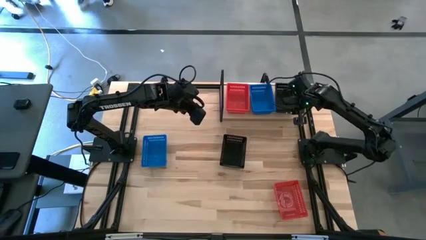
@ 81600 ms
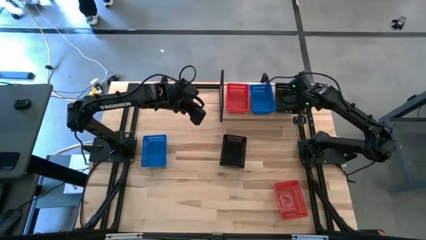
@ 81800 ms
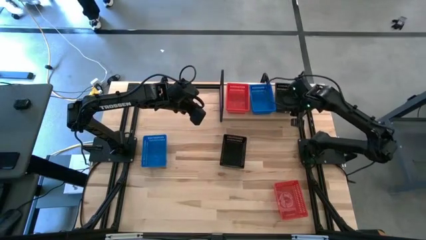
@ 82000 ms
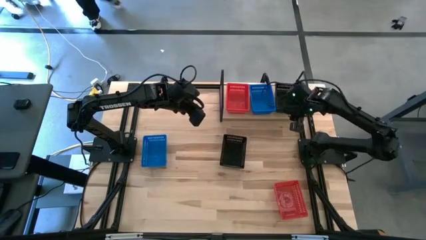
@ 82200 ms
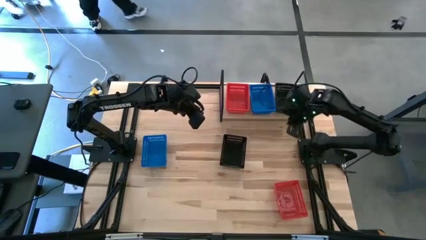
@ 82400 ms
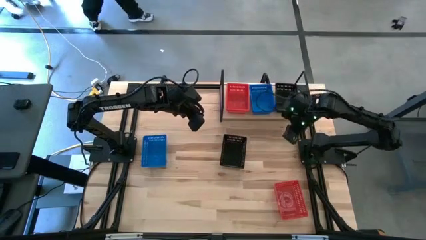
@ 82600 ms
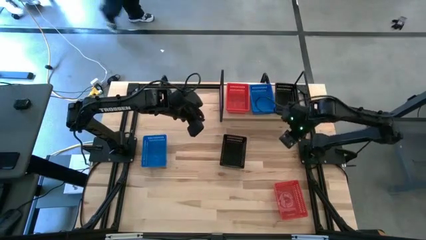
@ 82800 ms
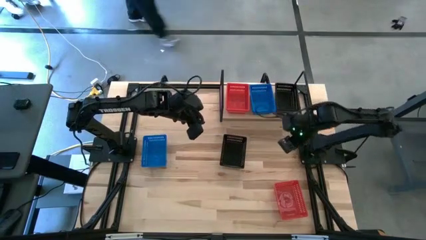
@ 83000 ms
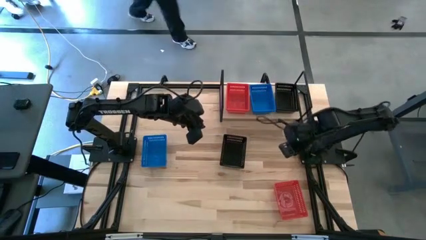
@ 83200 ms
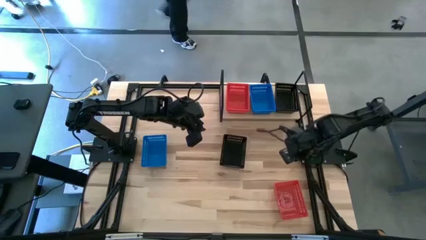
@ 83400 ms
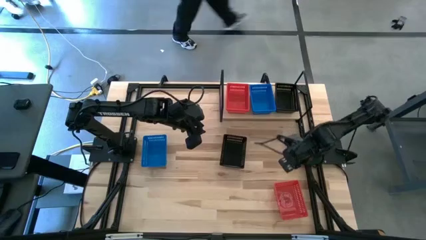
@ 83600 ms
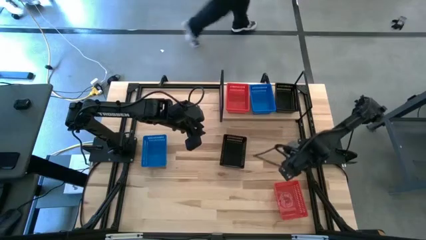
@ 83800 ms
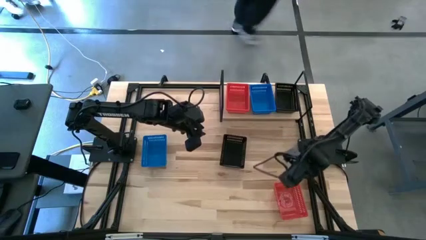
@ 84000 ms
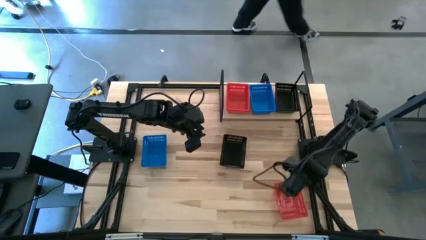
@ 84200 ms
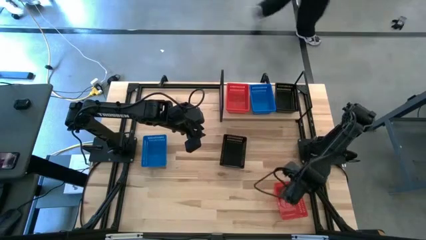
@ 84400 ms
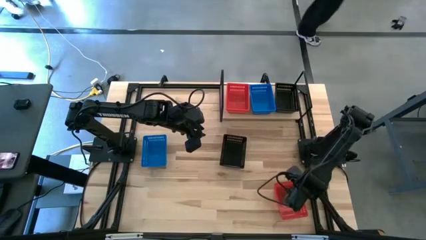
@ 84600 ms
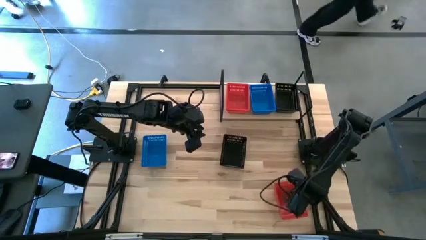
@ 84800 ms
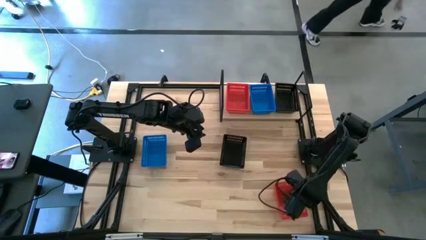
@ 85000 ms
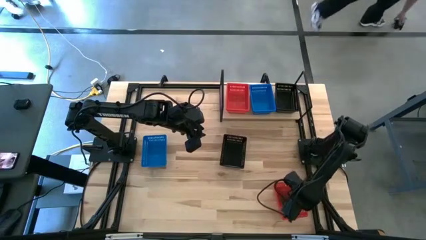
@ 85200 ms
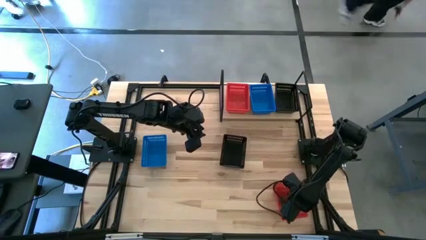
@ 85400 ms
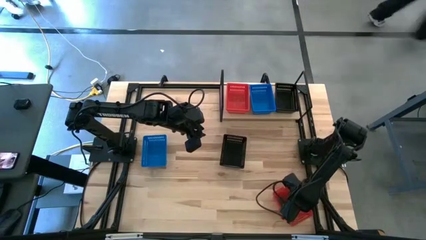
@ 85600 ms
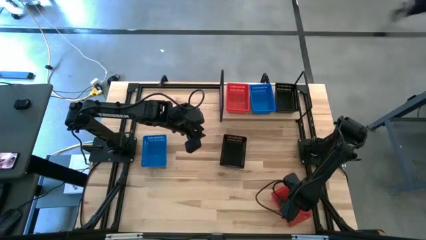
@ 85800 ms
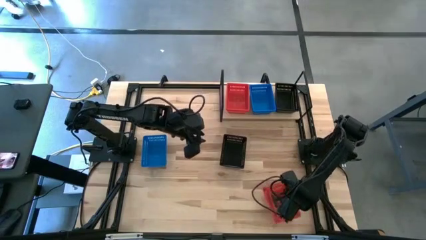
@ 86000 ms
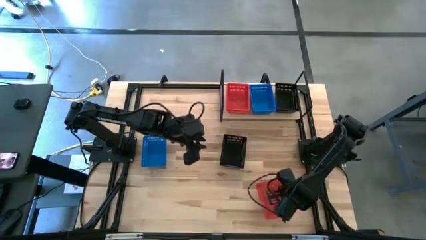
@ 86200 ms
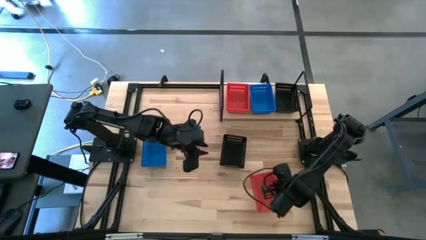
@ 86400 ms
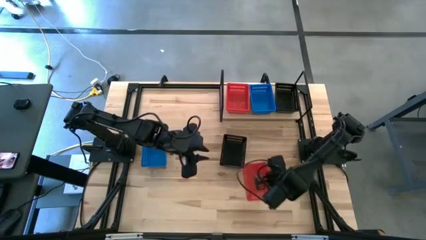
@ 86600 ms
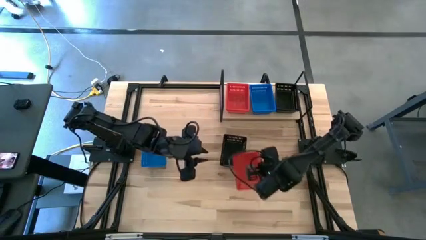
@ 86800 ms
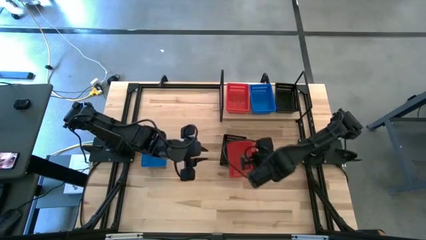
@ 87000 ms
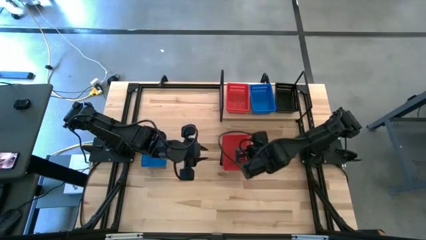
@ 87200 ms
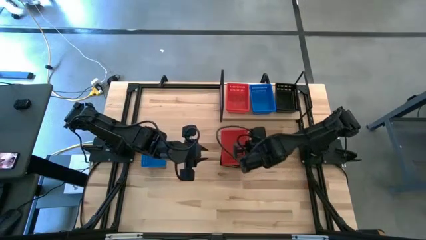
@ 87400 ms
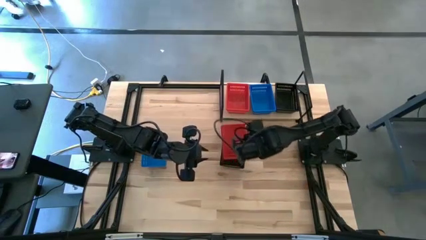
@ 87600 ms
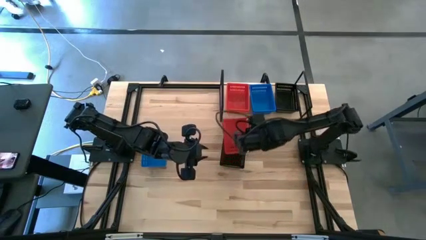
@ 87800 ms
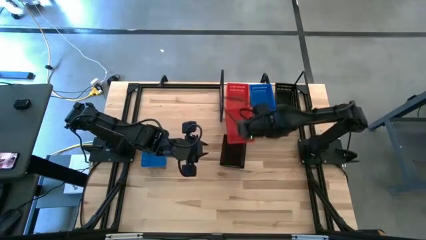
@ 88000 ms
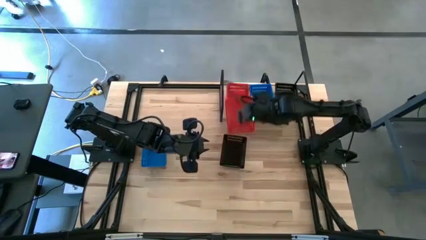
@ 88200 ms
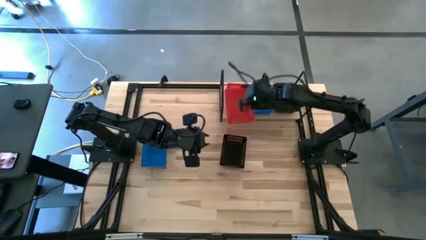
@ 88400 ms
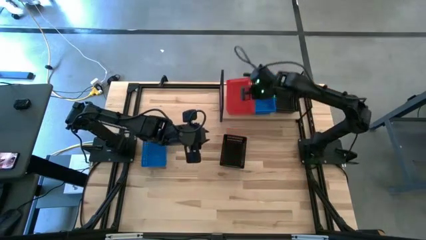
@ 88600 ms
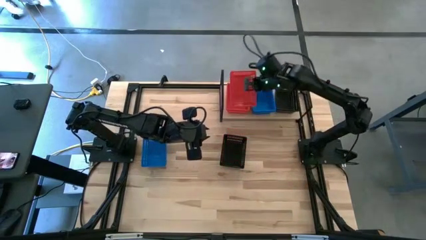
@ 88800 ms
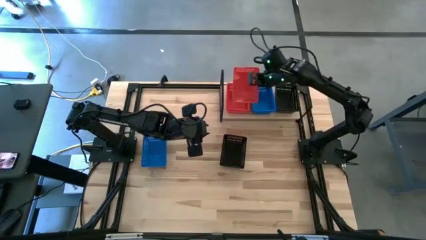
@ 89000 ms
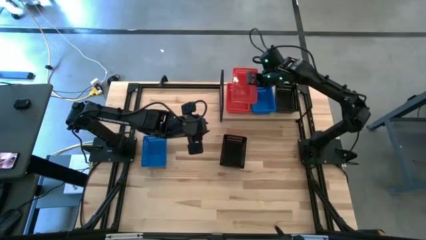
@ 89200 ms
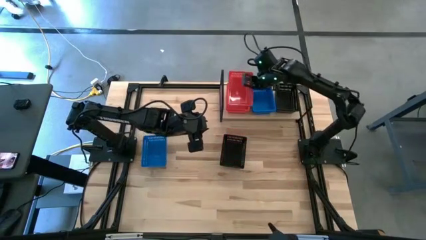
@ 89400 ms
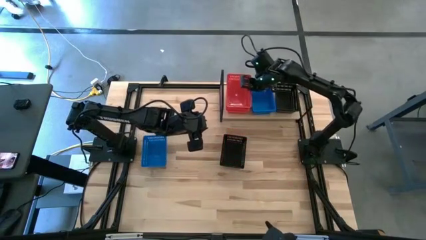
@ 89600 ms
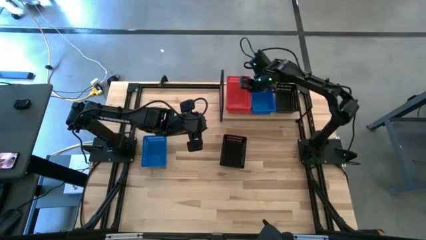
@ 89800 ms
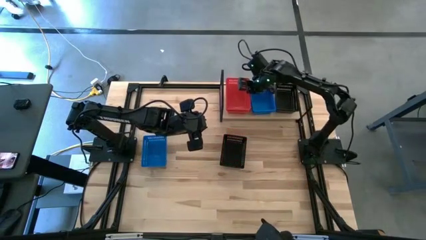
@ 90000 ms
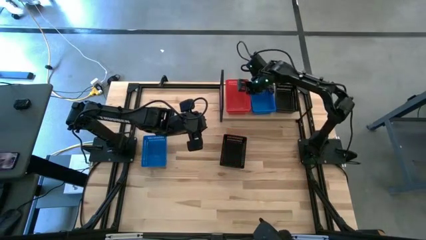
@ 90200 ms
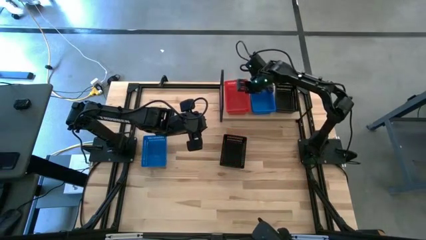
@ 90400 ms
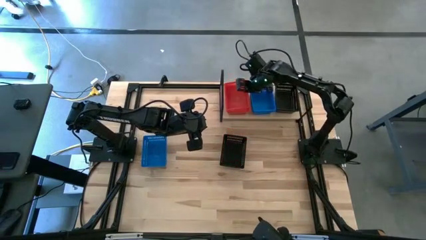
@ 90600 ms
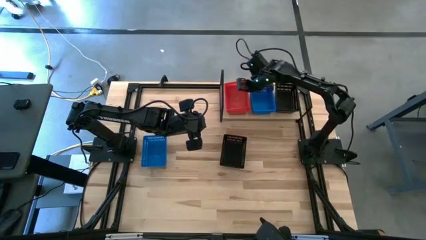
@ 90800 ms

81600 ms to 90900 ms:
Task: Stack baskets on shelf by color
Stack the red bin on the other red bins on the shelf

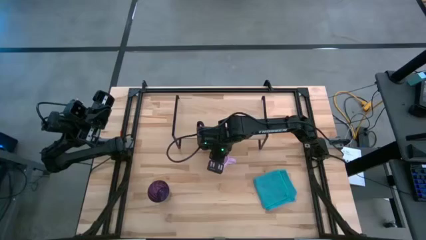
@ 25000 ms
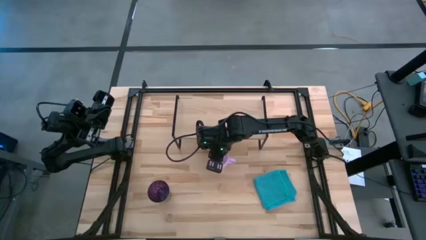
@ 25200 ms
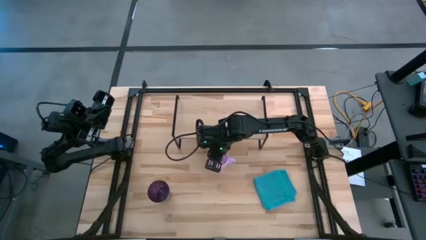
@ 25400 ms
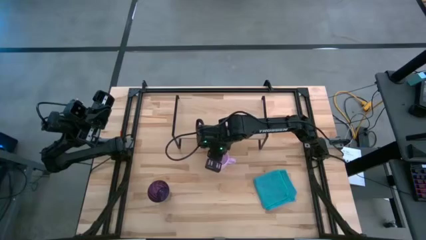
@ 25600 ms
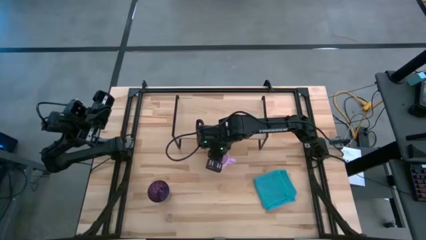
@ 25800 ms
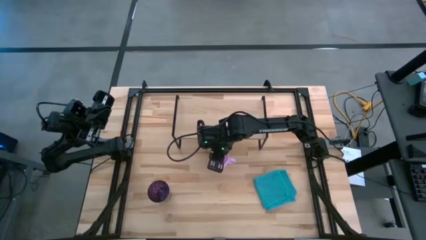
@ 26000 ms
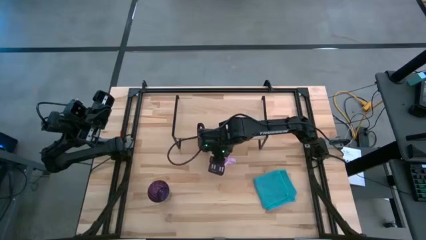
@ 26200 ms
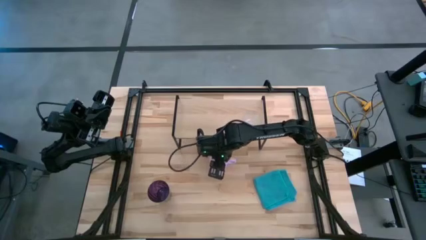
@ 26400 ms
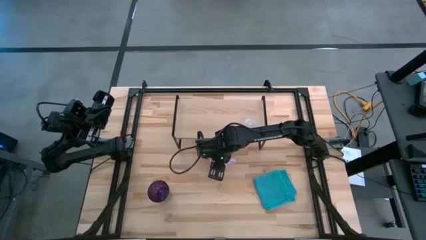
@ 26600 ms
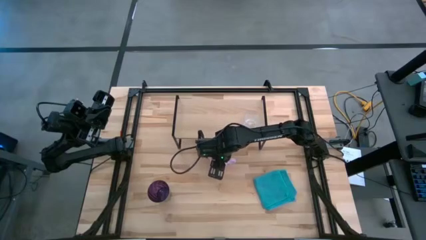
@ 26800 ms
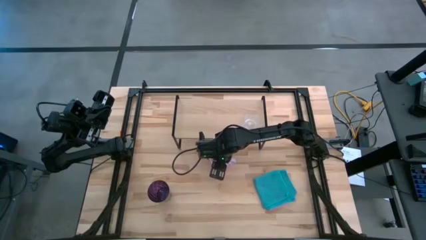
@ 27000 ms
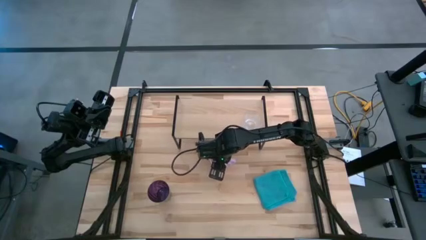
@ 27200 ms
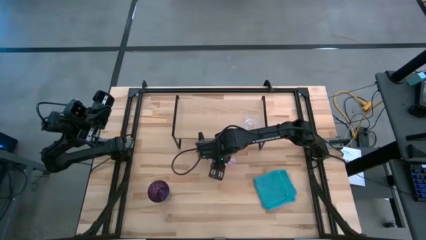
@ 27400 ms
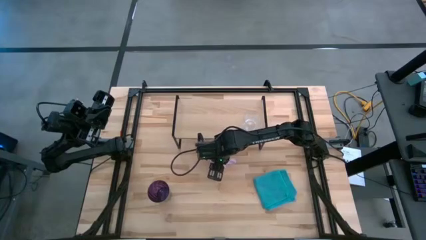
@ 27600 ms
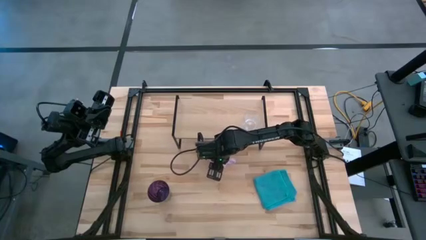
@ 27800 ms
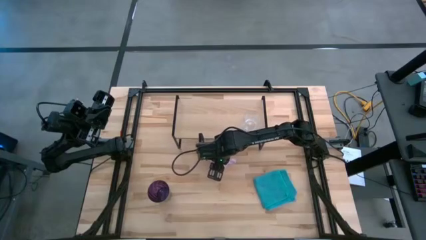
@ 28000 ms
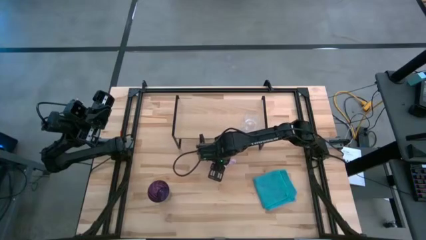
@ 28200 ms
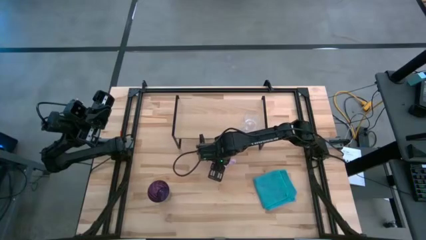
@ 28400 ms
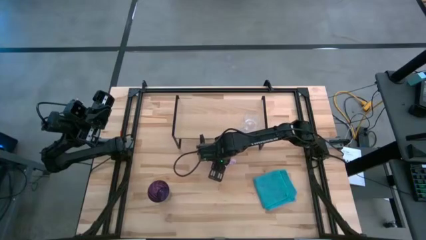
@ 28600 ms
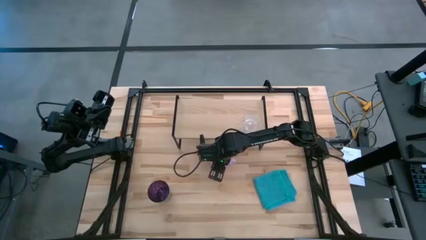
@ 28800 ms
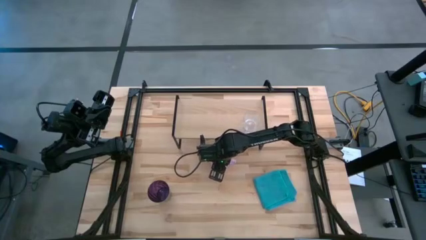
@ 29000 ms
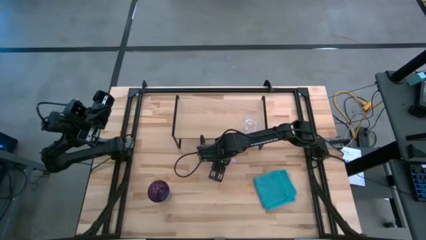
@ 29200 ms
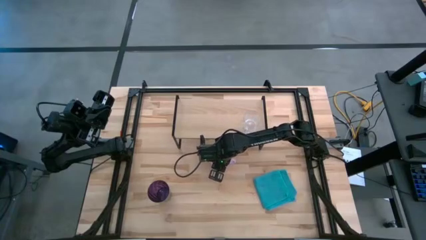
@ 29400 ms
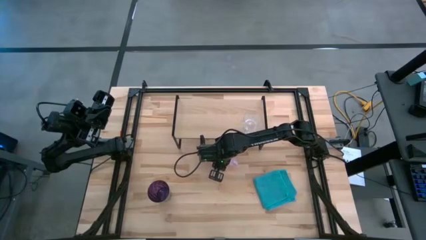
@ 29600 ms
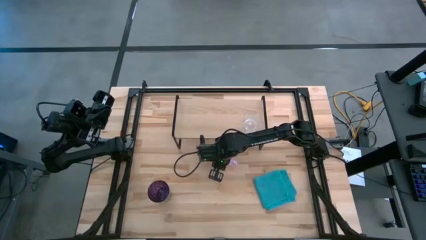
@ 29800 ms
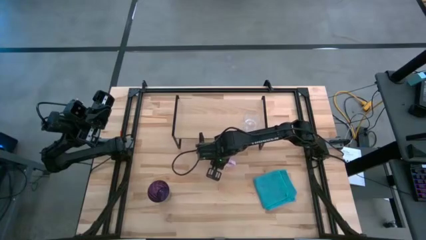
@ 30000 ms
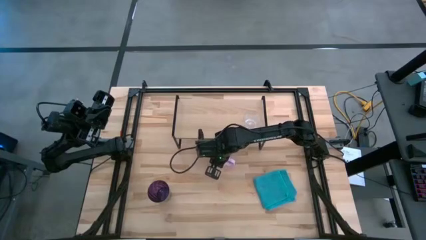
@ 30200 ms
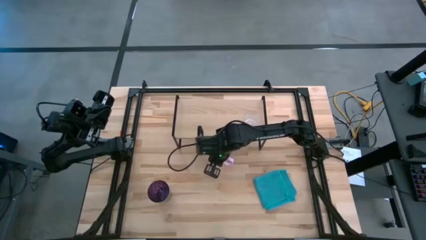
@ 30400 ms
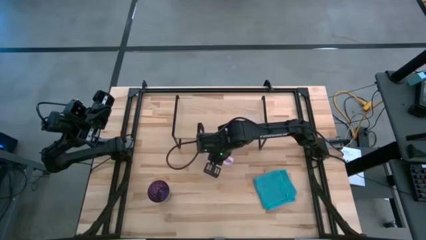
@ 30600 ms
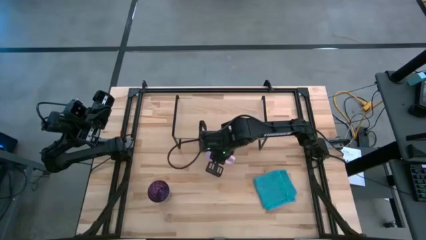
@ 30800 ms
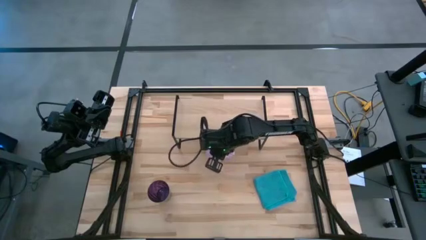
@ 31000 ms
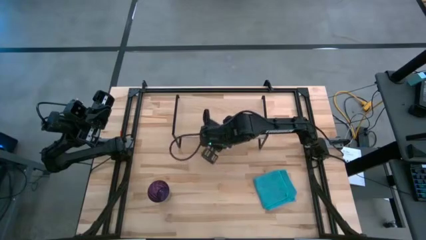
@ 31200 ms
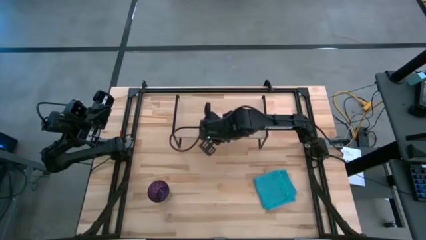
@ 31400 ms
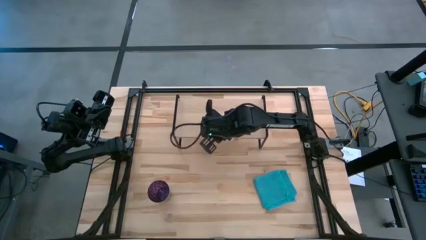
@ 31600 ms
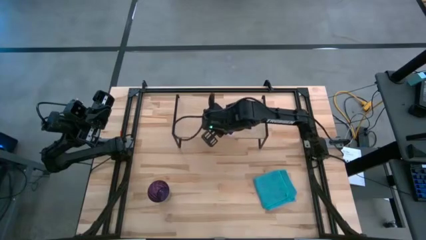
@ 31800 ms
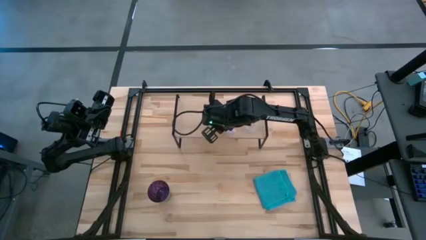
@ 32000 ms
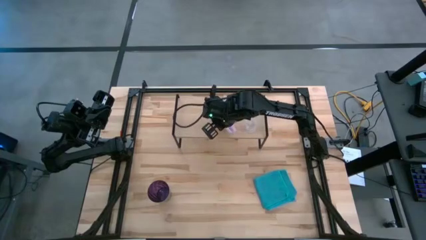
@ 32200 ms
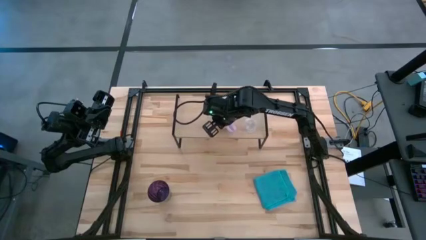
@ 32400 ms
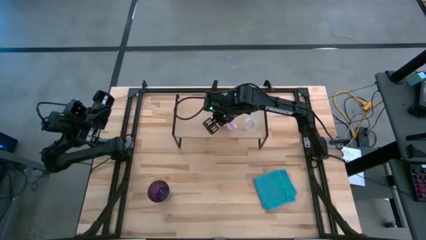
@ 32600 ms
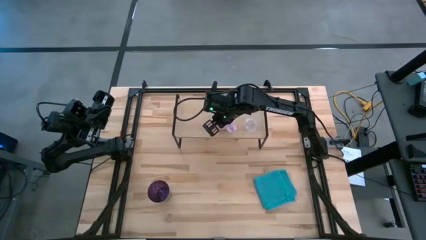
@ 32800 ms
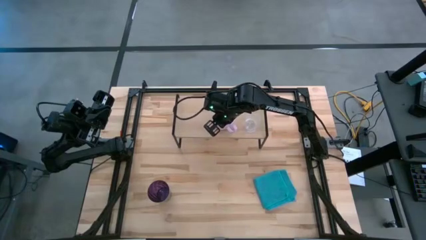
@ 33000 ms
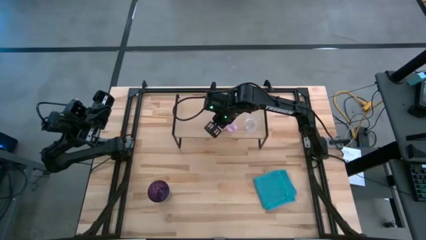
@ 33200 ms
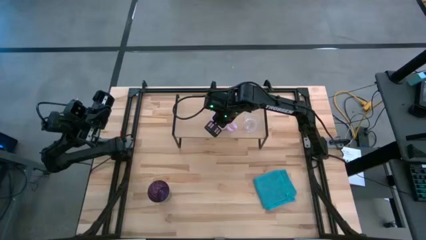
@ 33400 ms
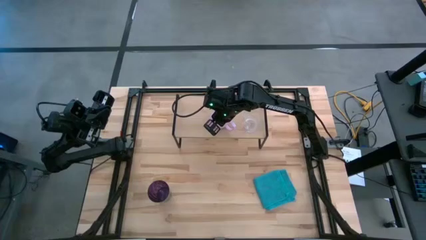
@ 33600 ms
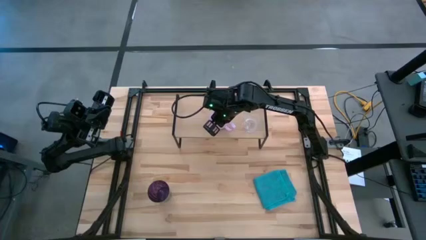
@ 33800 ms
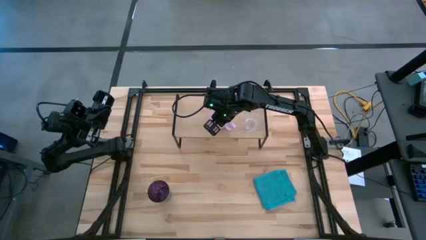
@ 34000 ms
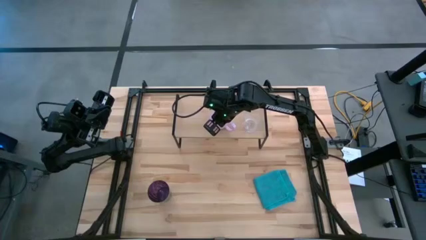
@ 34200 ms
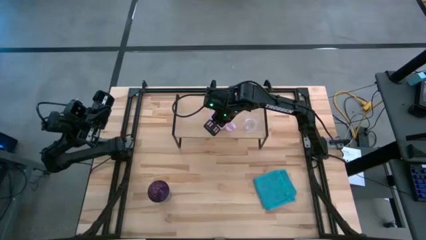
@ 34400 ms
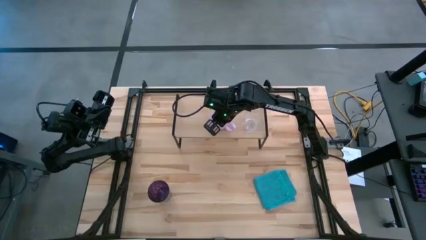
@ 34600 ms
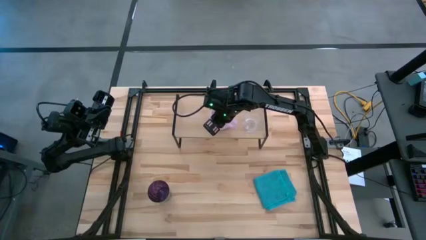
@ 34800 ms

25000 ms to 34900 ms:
Task: Stack small to large cups/mugs on shelf
Put the pink mug on the shelf
